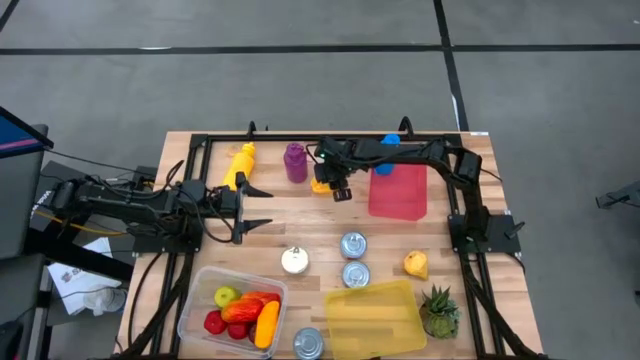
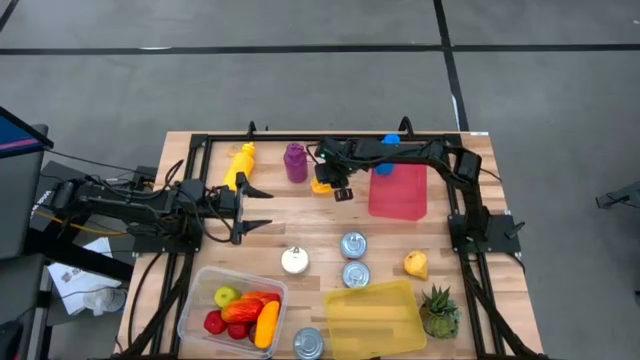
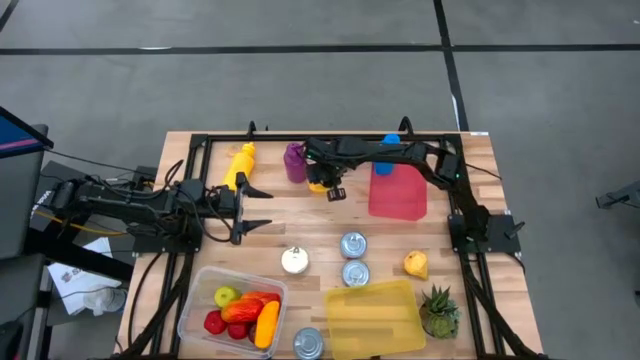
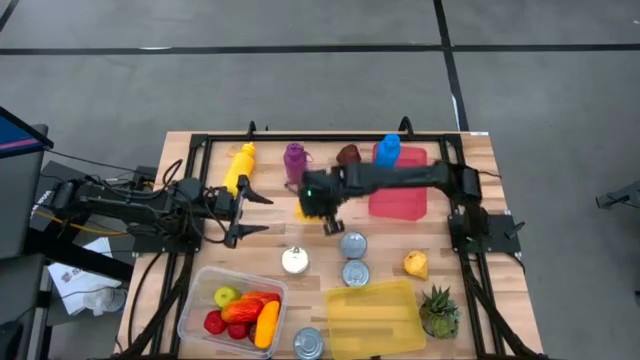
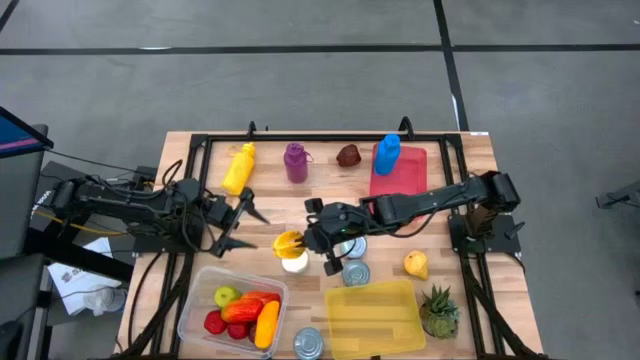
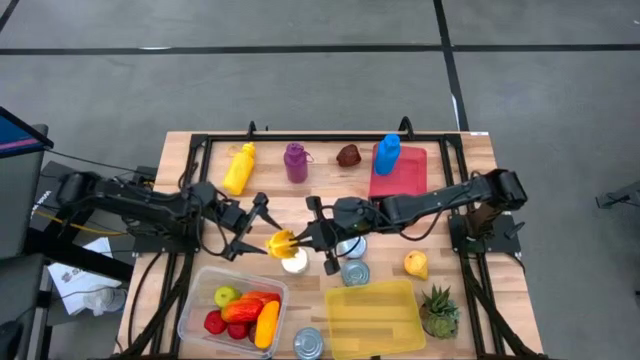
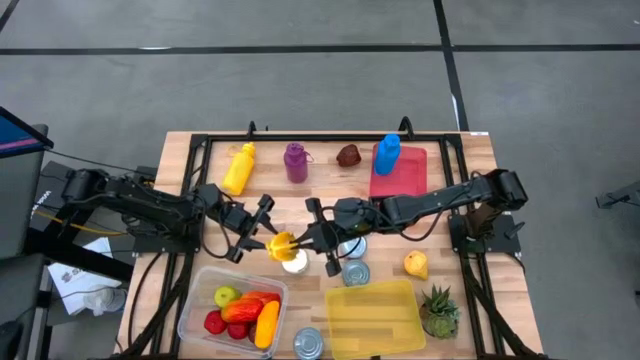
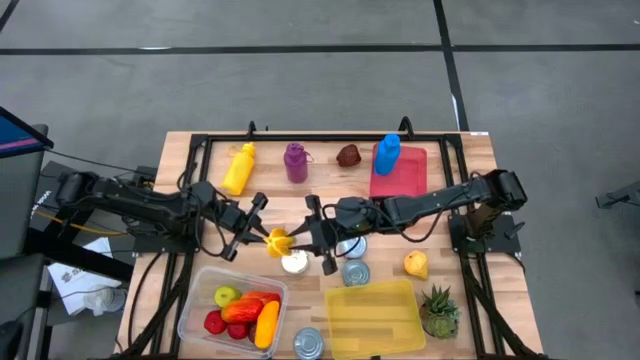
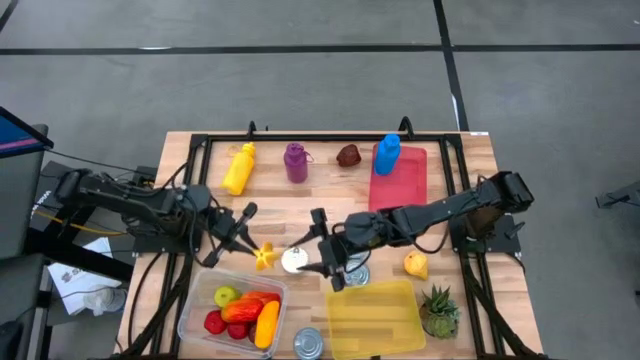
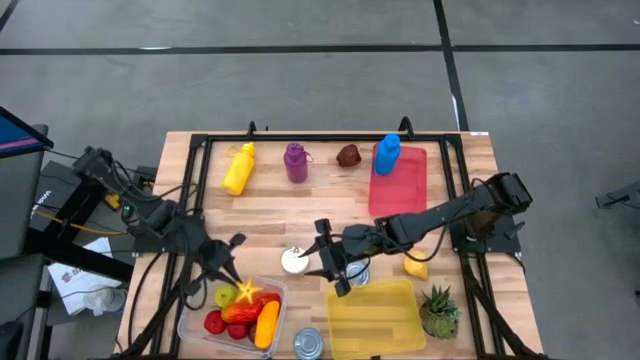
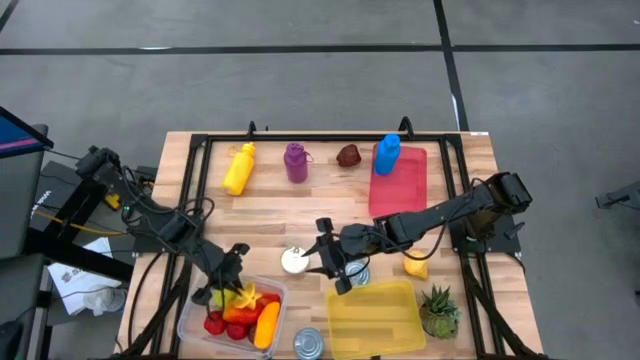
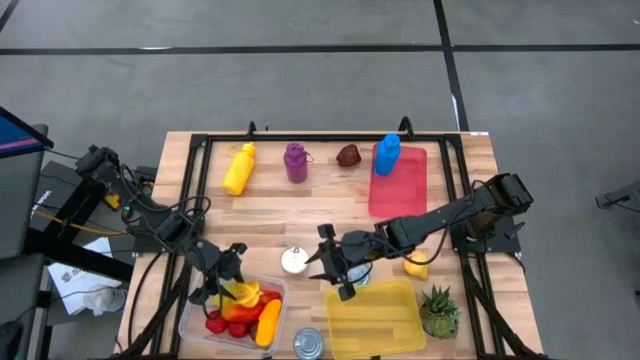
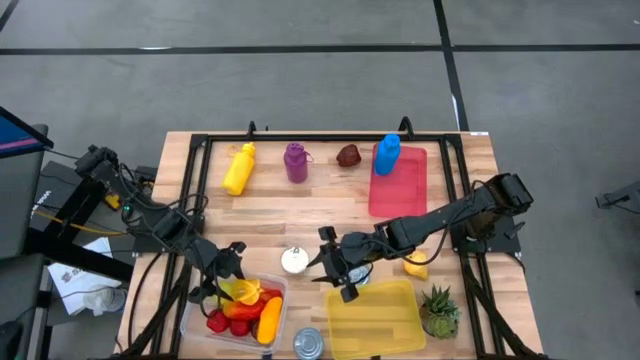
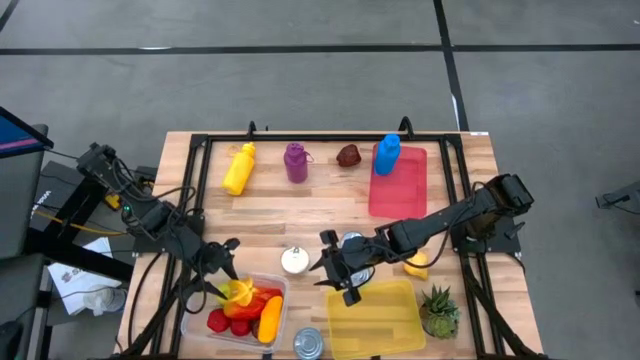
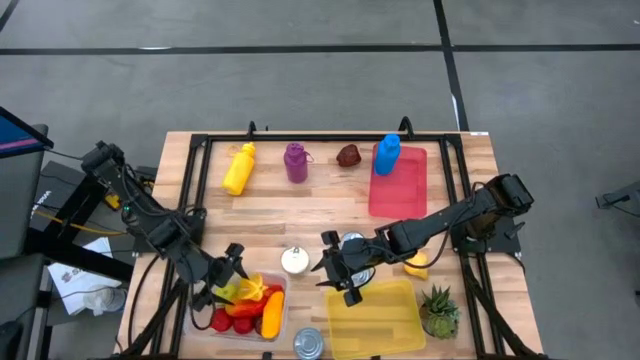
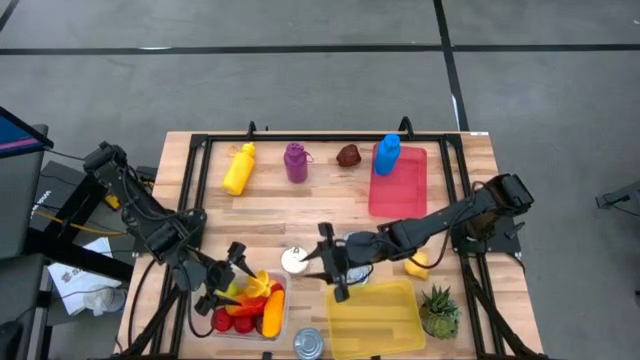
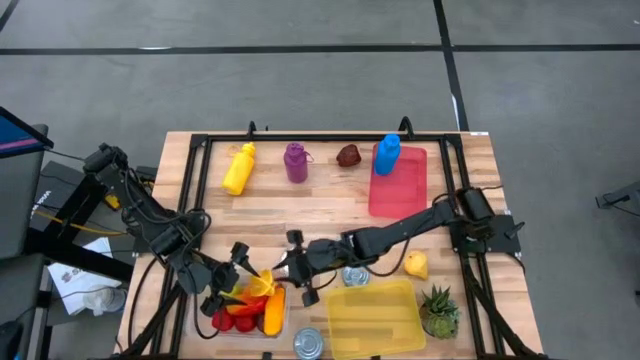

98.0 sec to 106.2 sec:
Task: Pick & Place Food Item
Put the yellow starfruit into the transparent bin

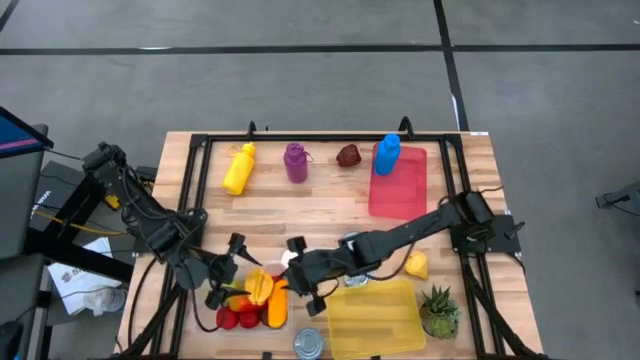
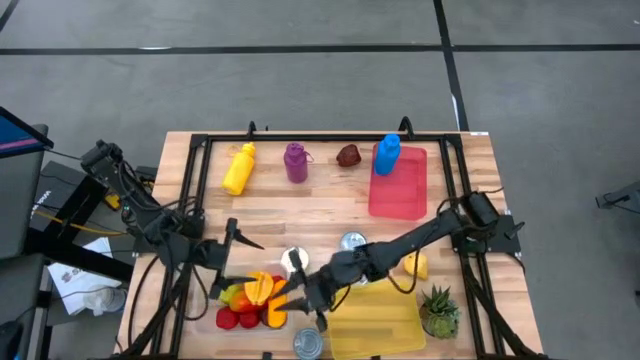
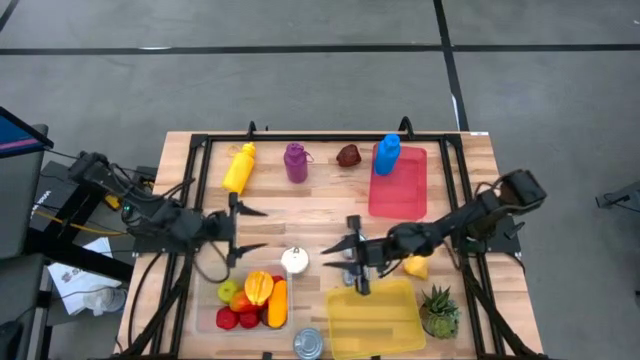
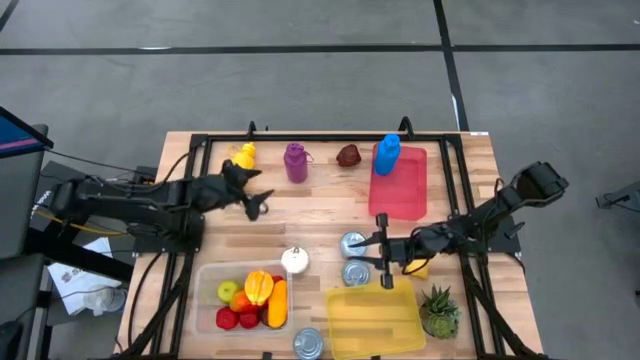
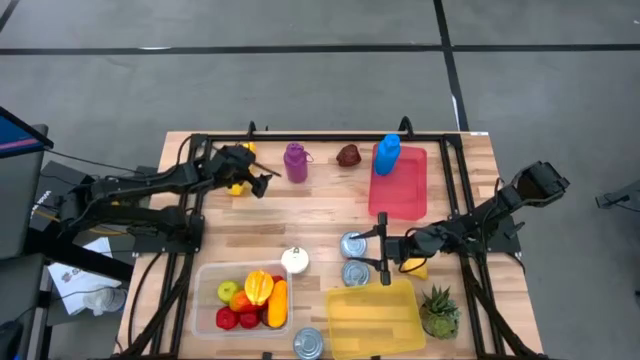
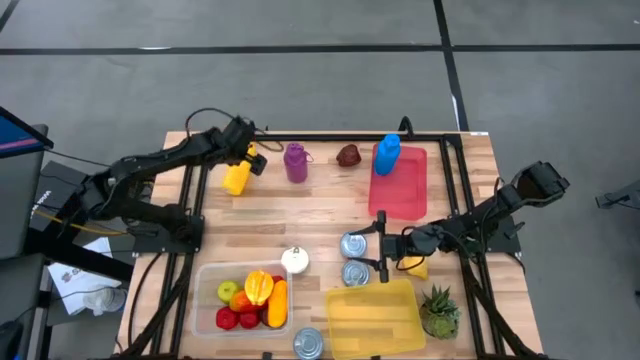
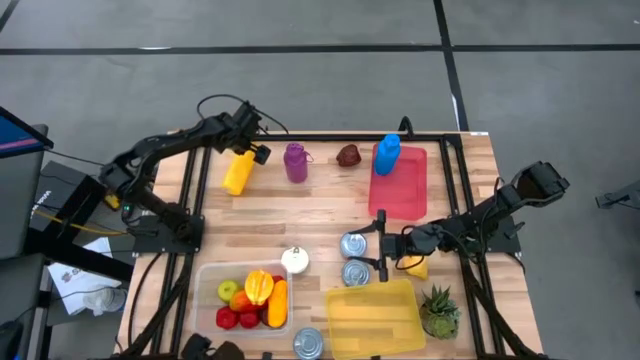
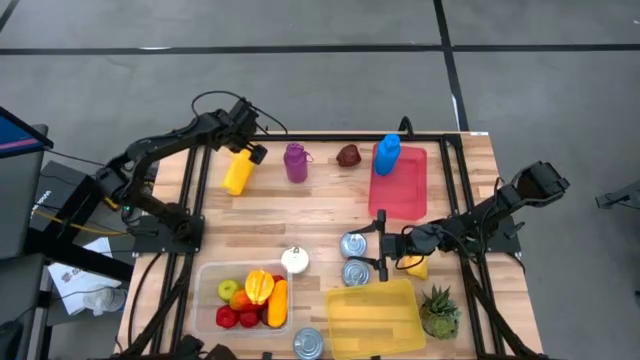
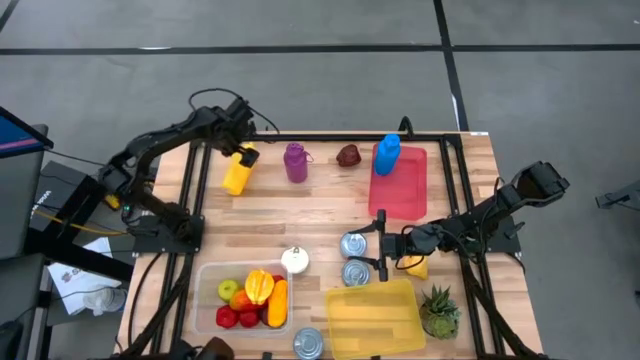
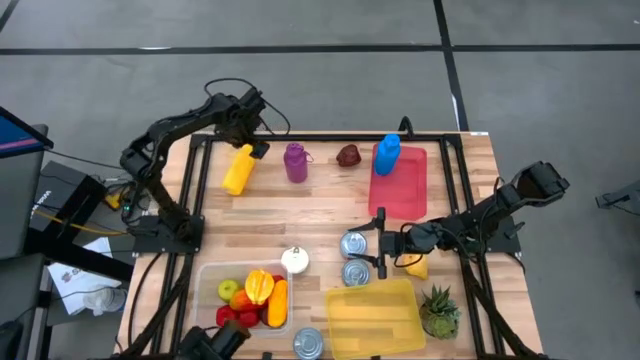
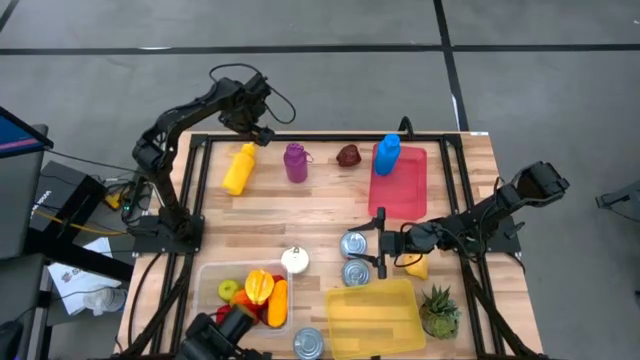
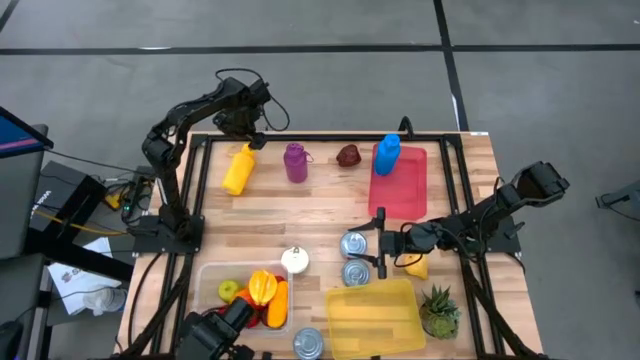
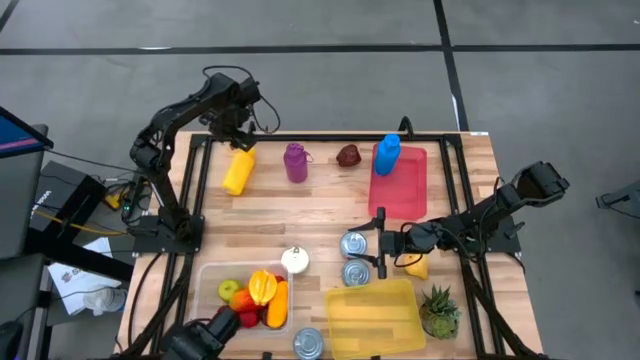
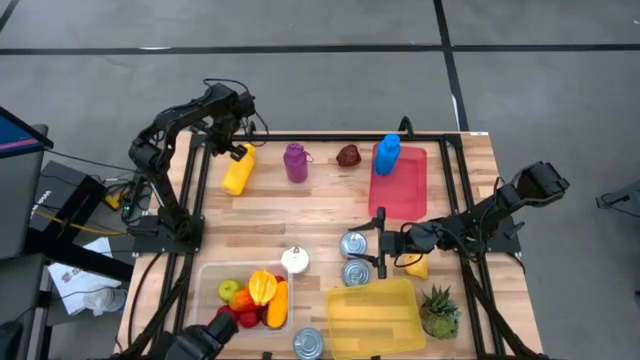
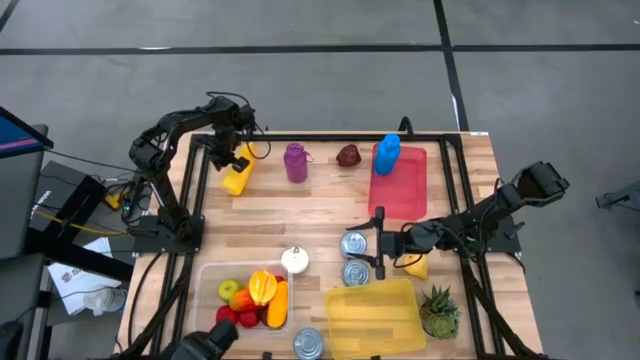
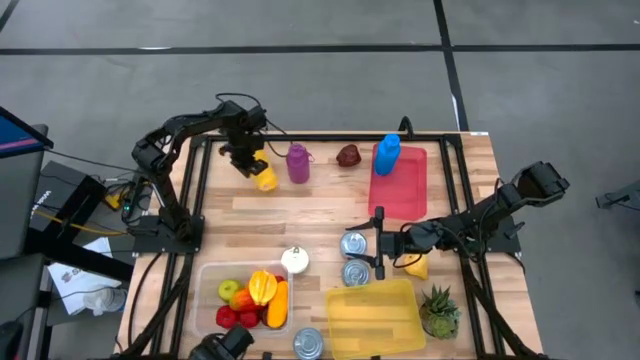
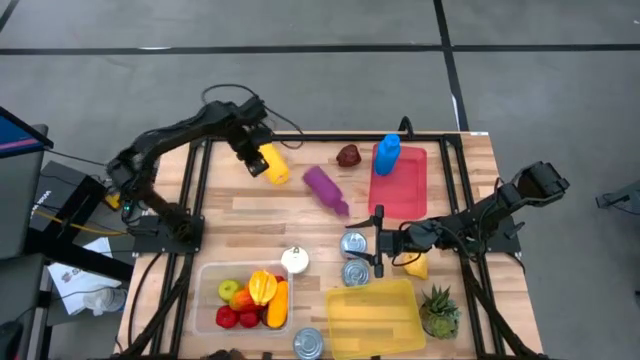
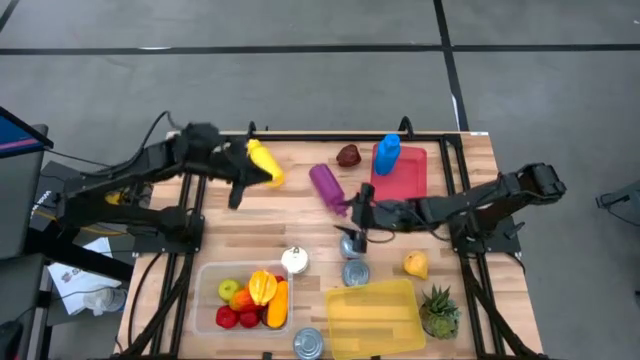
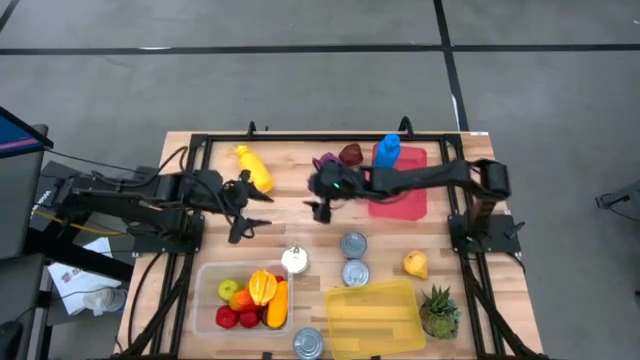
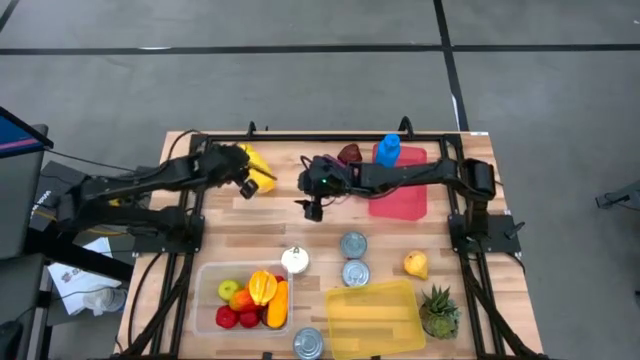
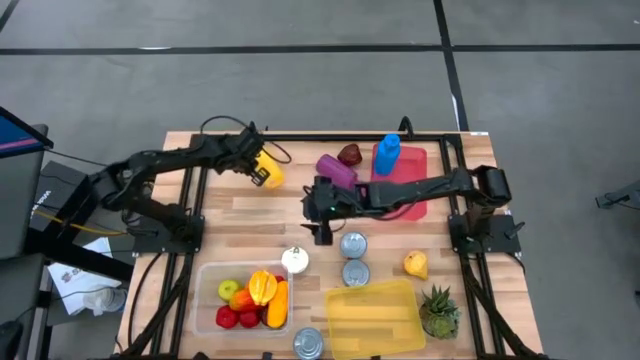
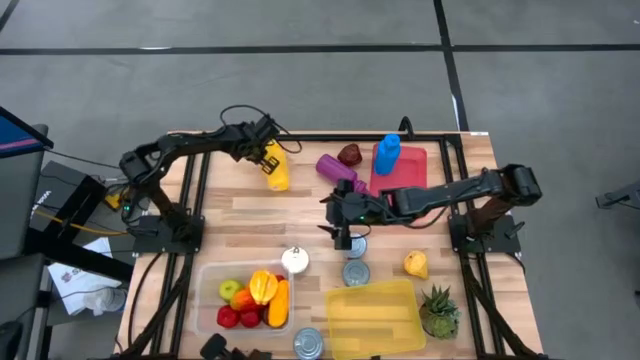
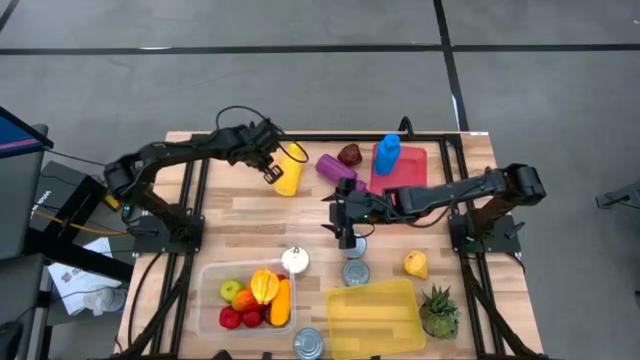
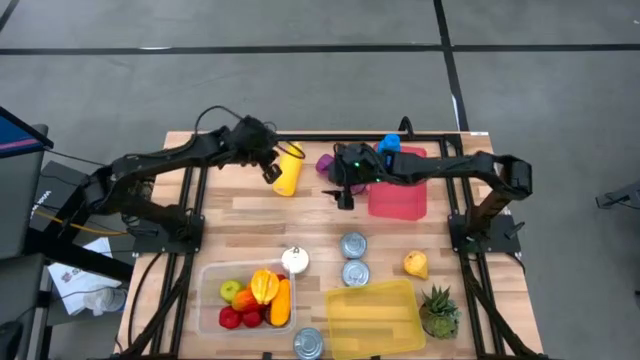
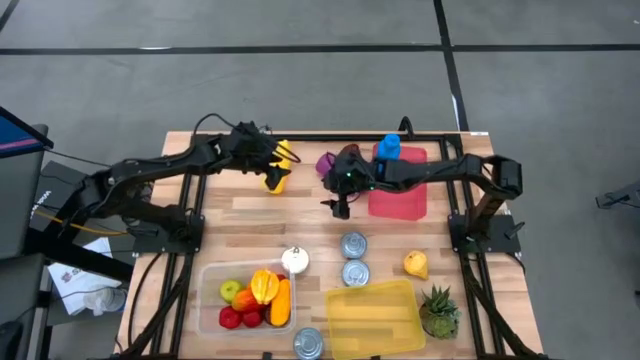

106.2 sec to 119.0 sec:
Put the yellow water bottle into the red bin

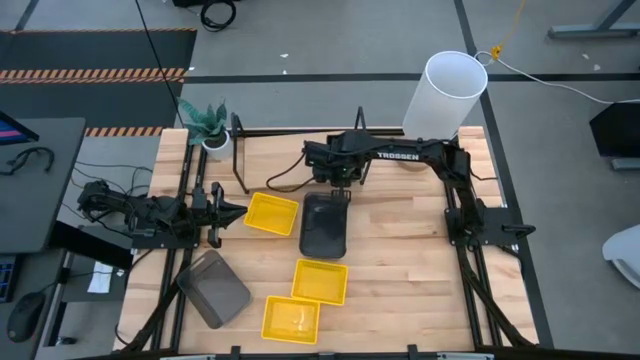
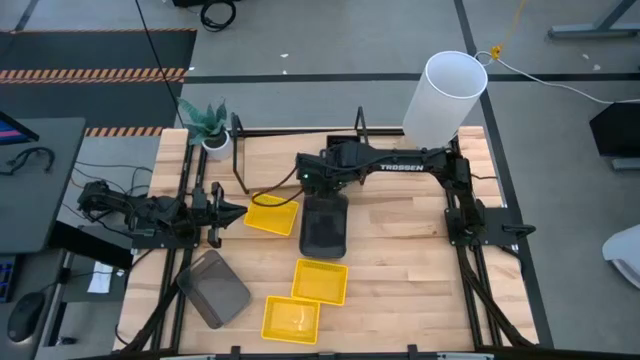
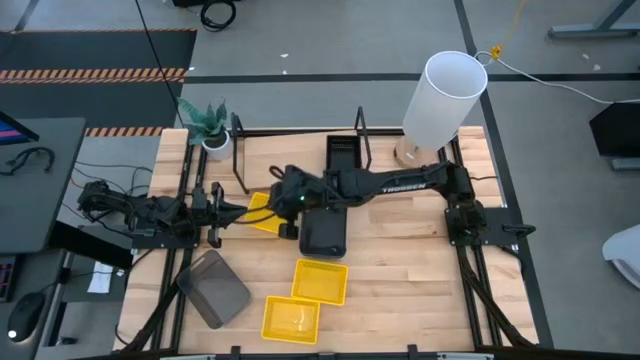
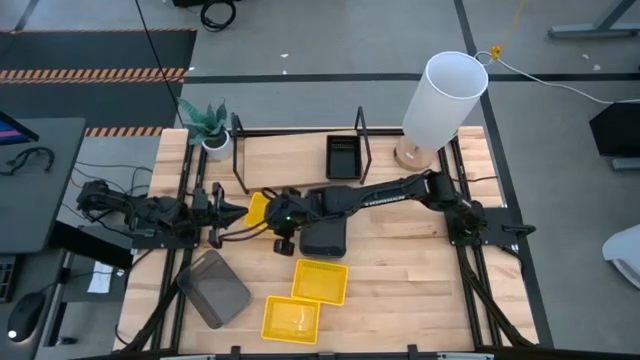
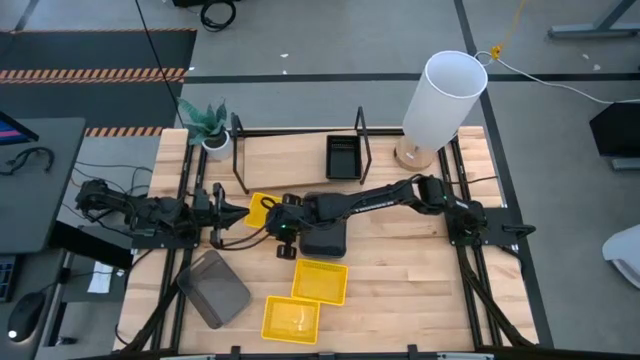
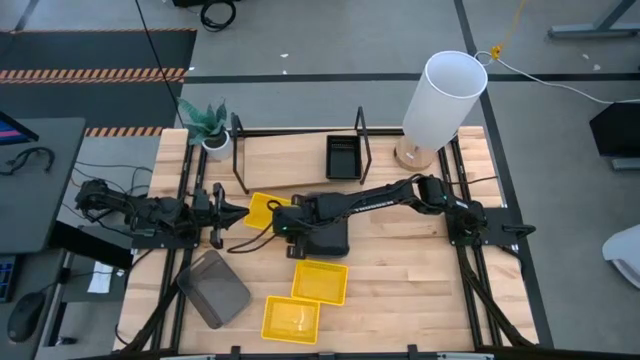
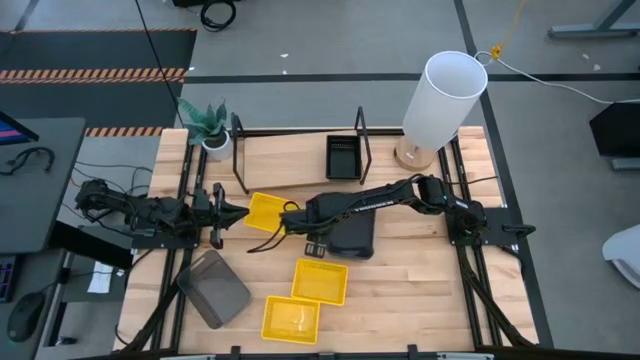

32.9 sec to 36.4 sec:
Task: Stack baskets on shelf by color
Adjust the black bin on the table
